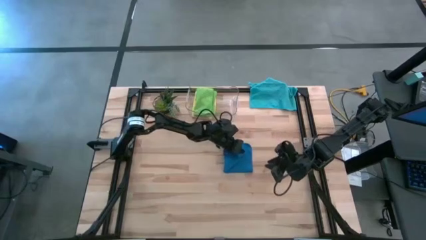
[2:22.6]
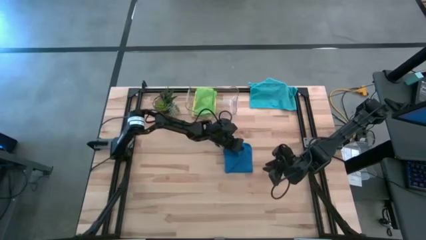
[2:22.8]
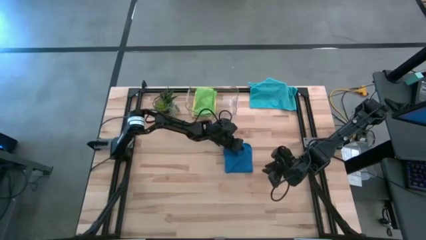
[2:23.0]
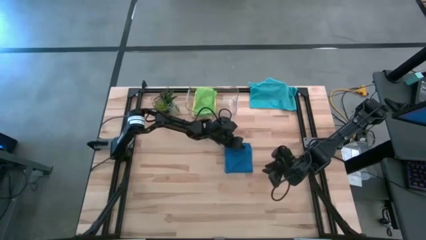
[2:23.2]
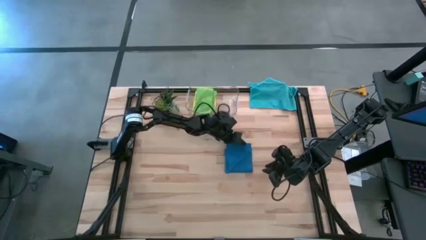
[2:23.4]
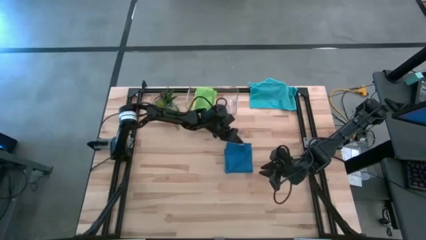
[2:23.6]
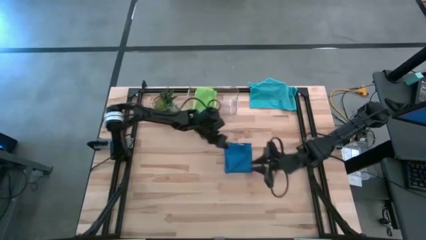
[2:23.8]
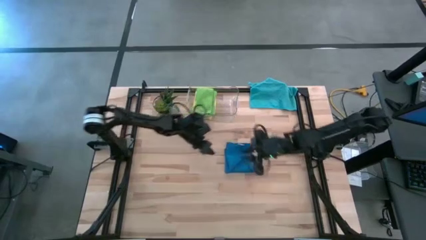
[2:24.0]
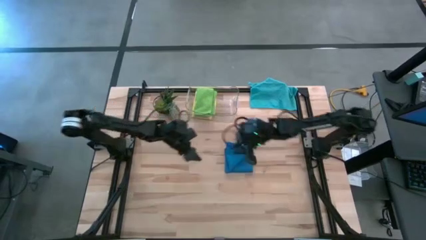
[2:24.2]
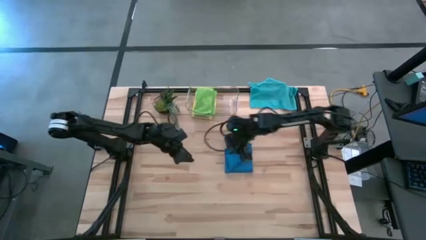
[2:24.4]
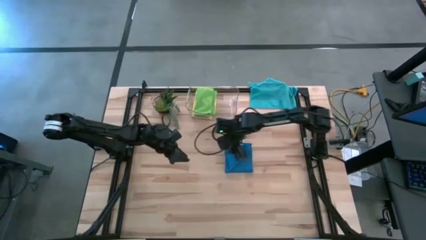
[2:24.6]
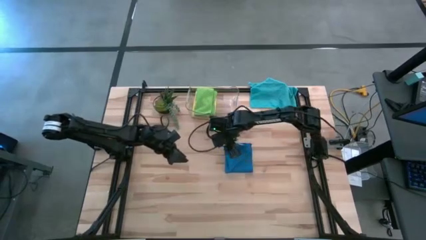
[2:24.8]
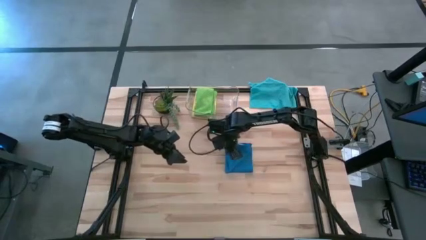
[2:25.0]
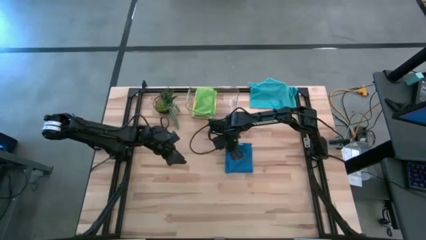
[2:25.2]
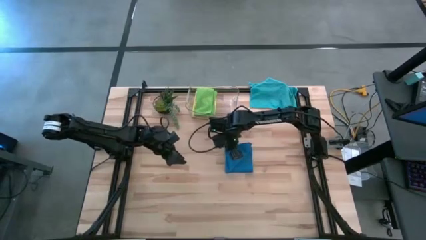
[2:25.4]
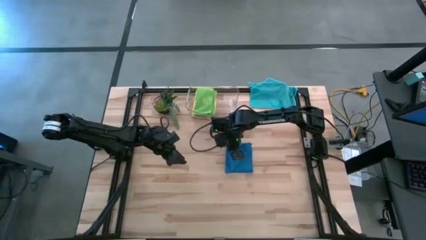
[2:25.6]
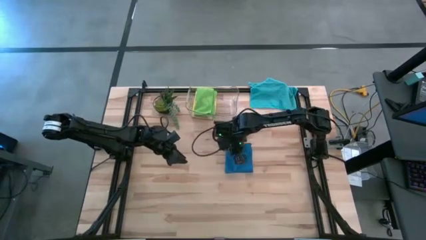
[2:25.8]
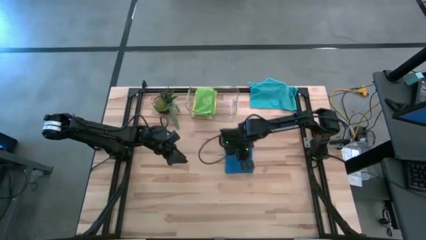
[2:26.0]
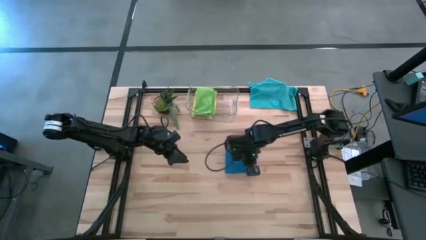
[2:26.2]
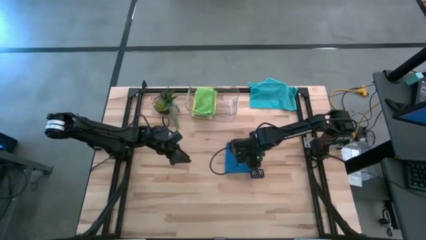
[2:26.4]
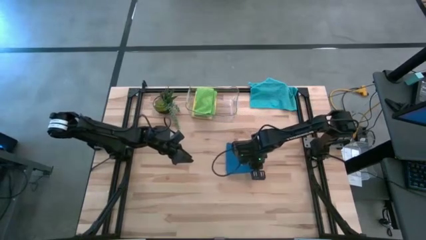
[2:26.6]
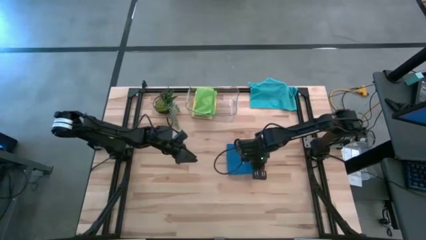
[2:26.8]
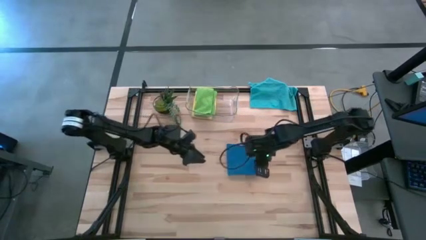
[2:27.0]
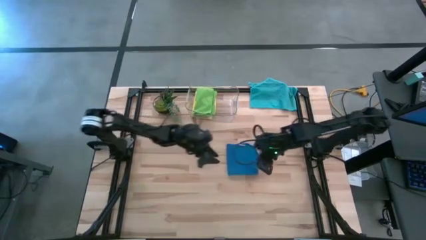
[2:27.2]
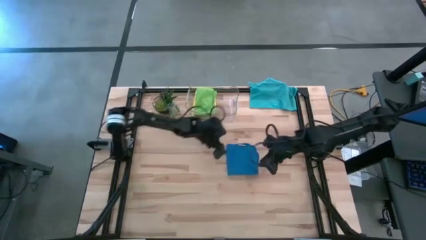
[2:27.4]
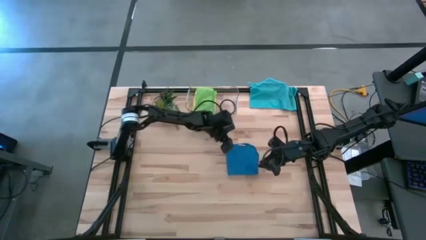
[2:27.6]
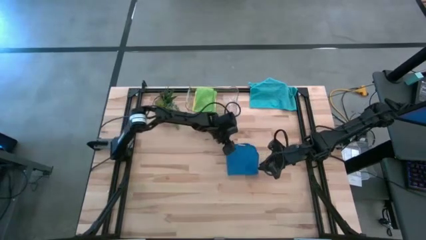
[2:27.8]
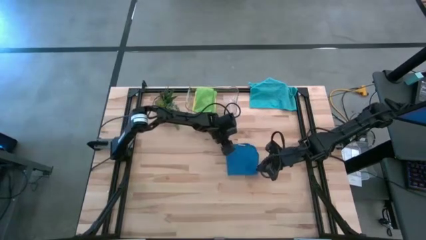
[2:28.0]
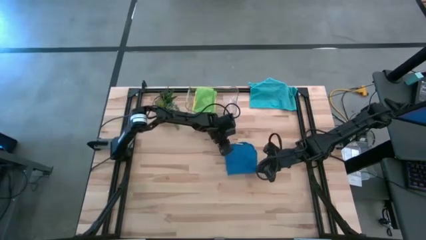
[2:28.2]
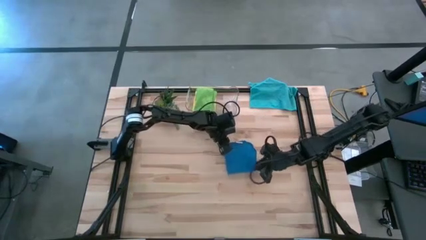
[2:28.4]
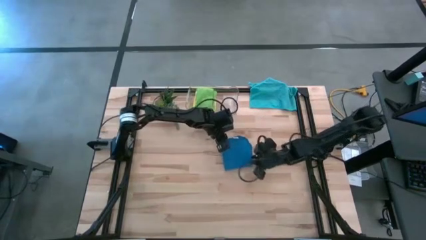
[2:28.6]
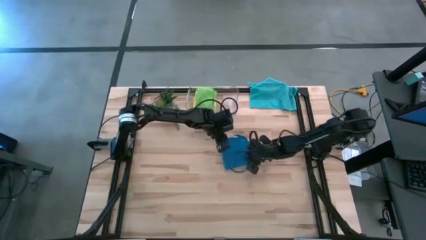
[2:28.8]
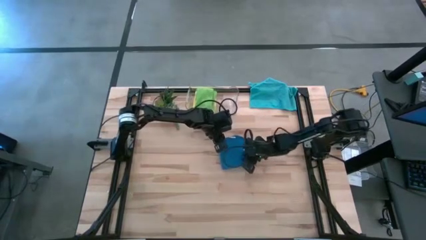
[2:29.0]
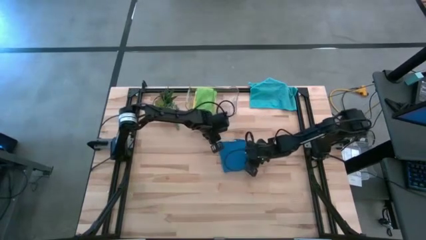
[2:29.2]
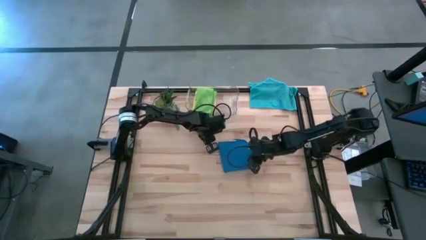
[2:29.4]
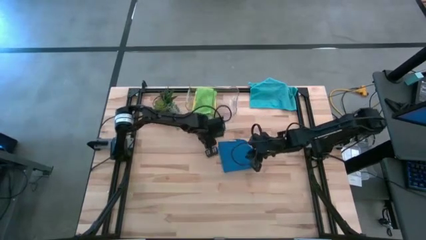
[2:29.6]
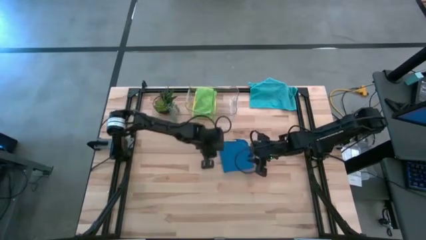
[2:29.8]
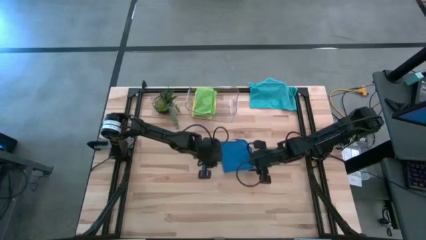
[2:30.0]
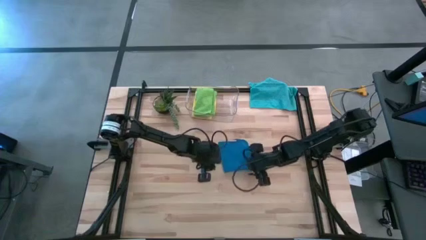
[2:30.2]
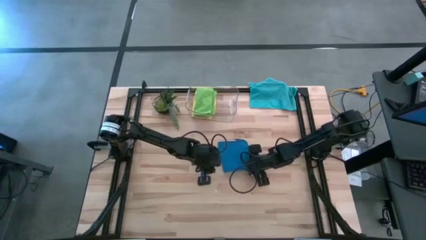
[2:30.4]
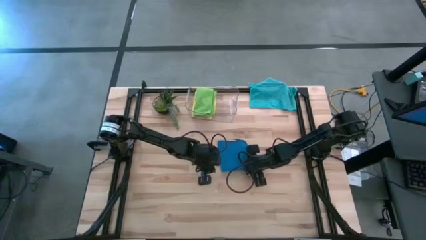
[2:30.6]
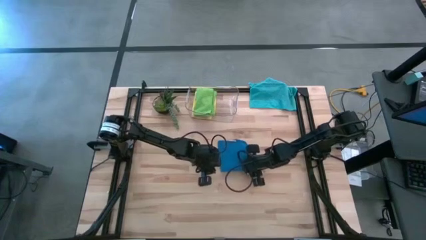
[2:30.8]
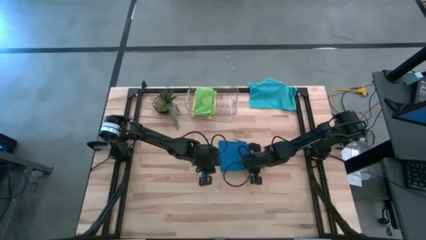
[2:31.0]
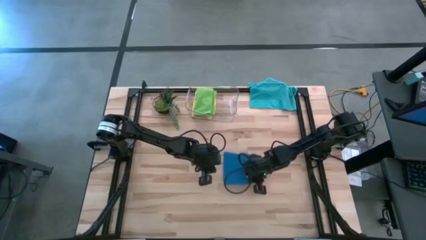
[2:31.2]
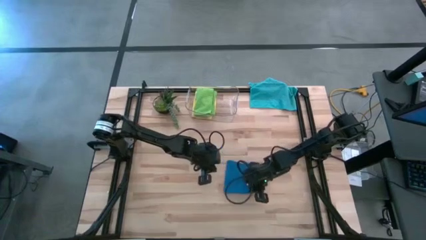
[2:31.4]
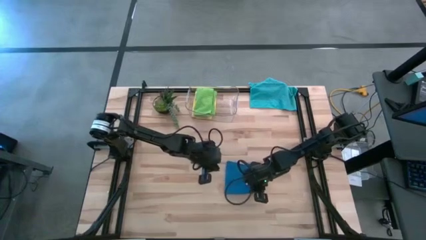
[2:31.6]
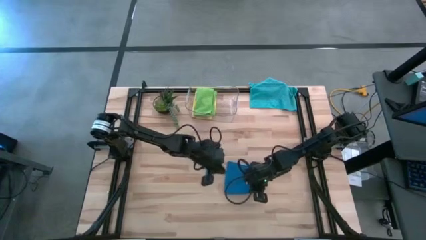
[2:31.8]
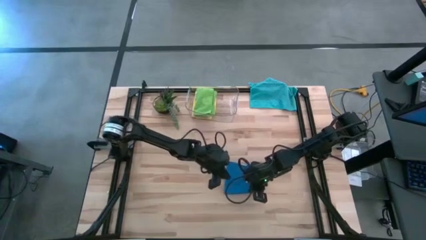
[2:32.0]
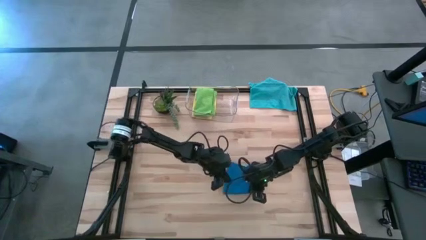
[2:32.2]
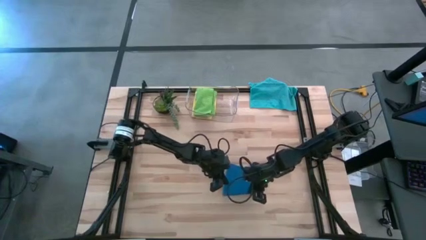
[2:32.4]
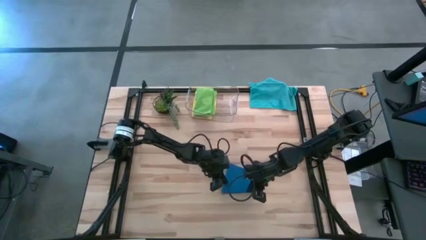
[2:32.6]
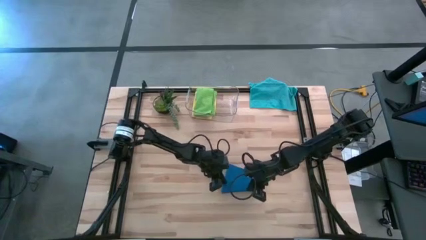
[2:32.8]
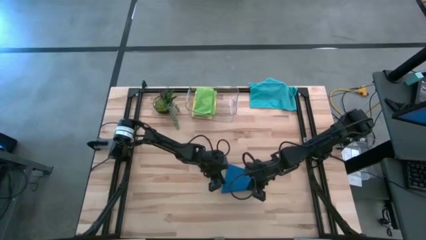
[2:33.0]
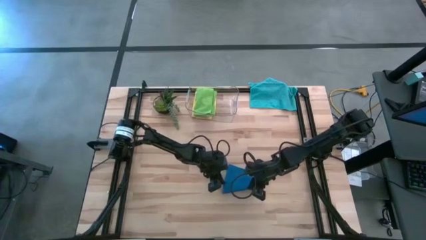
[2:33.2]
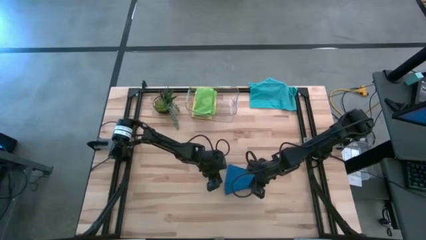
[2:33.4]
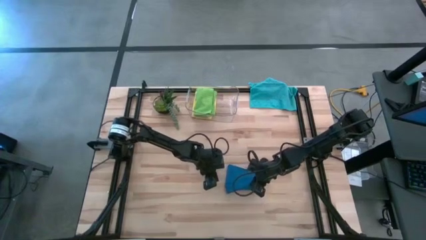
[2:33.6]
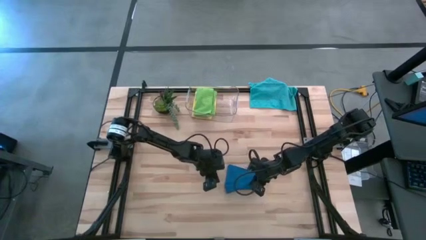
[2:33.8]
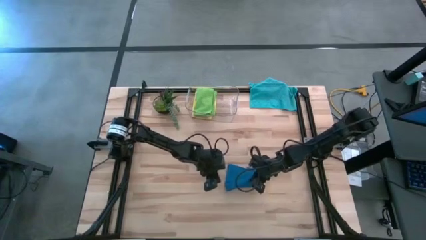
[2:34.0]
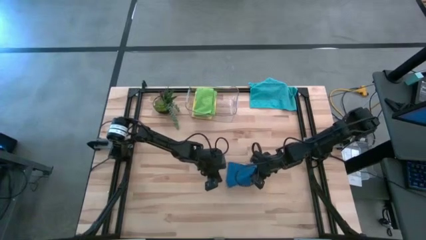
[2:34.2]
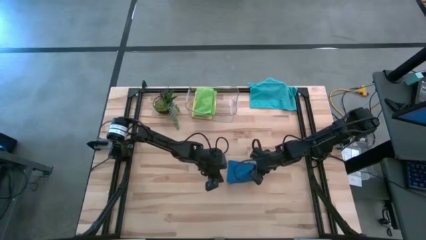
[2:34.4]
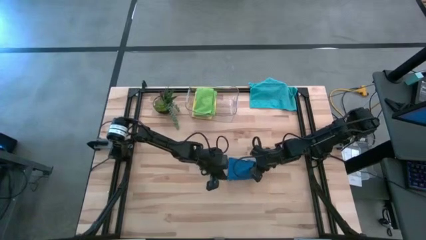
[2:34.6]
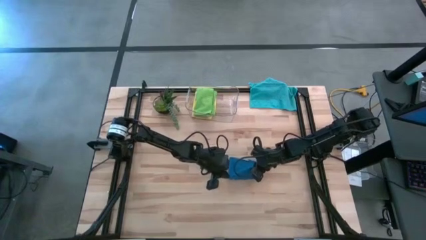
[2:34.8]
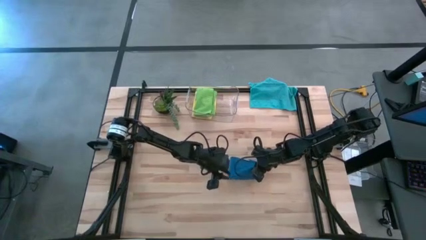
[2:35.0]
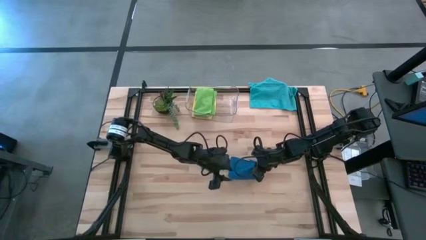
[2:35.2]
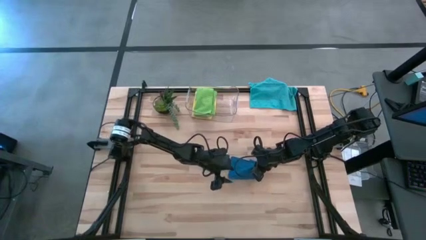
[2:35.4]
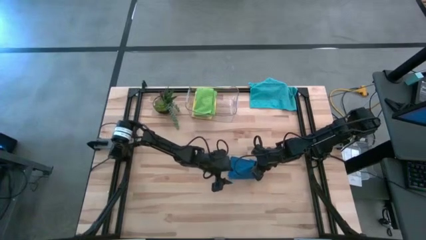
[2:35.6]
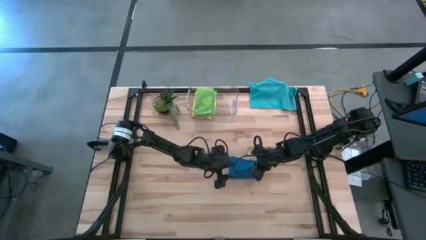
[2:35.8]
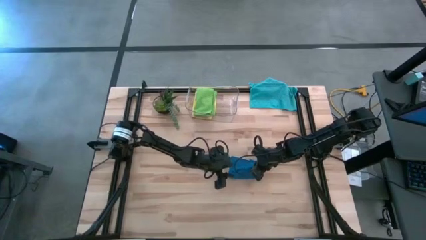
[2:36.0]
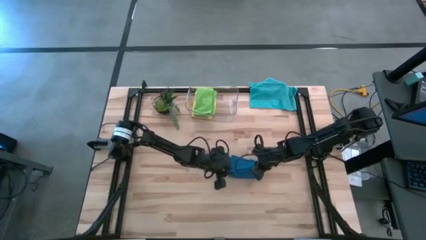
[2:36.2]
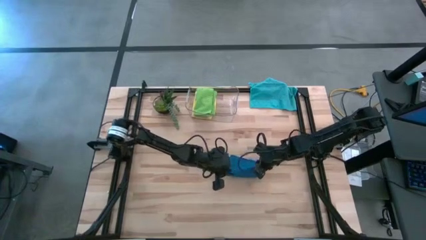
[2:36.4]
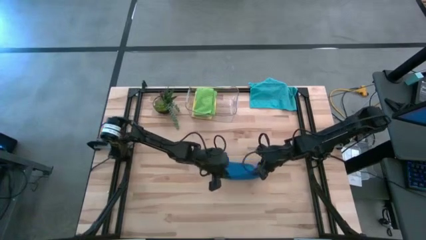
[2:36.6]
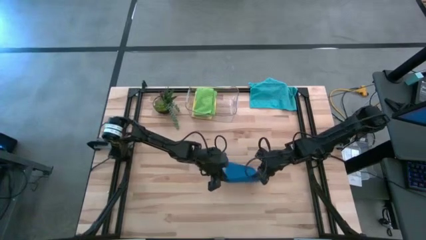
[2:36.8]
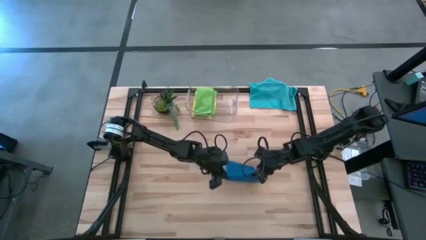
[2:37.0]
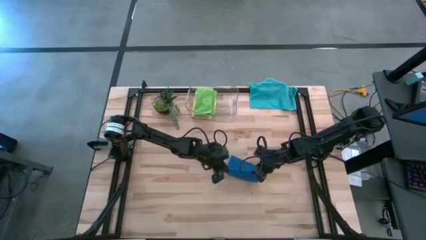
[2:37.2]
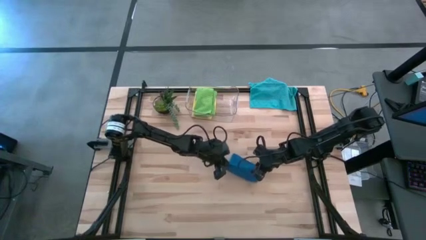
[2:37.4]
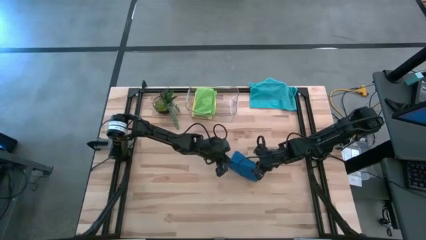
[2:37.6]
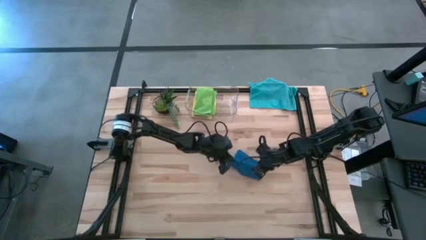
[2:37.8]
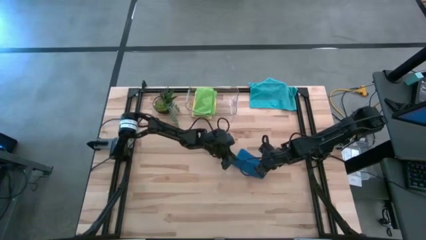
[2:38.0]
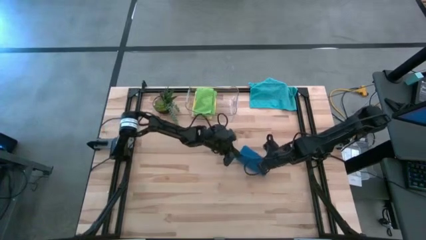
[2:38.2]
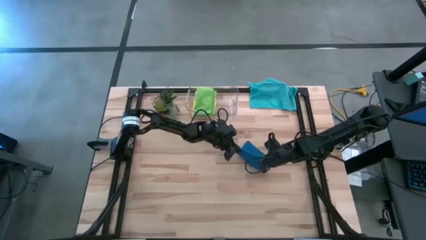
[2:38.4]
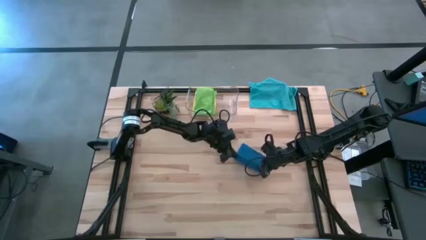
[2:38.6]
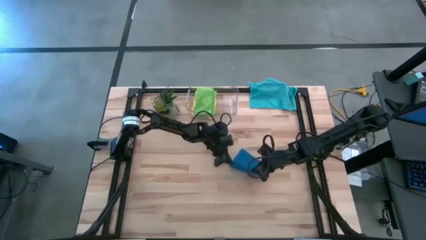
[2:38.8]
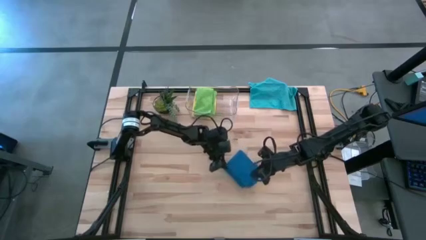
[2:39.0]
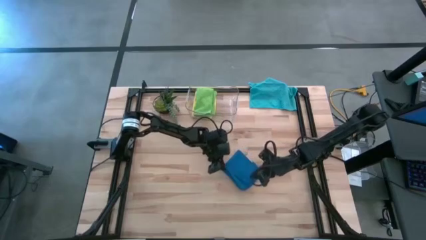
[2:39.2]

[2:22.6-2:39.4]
Task: Fold microfiber towels
Fold the bottom blue towel
